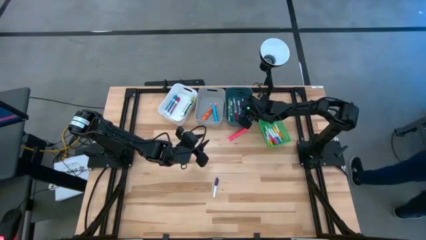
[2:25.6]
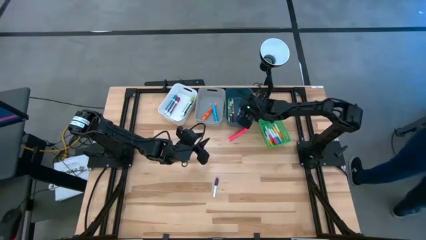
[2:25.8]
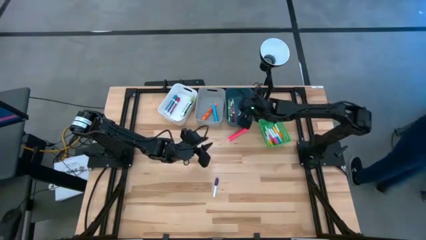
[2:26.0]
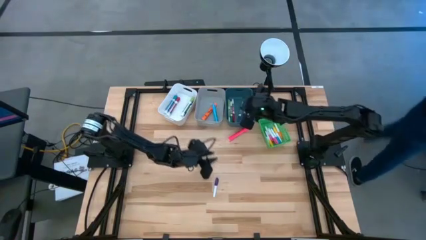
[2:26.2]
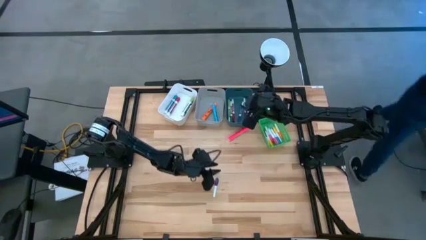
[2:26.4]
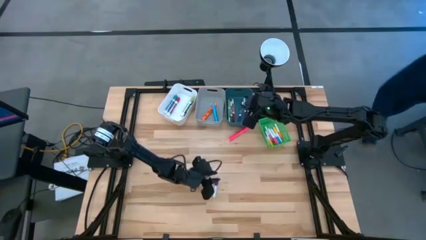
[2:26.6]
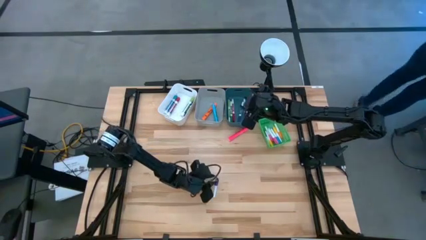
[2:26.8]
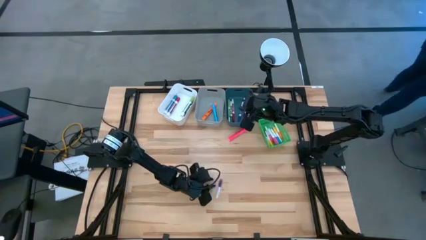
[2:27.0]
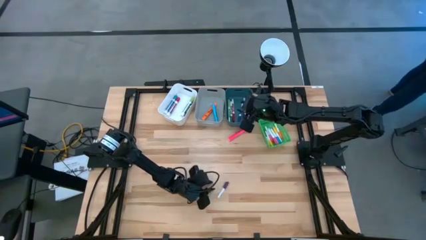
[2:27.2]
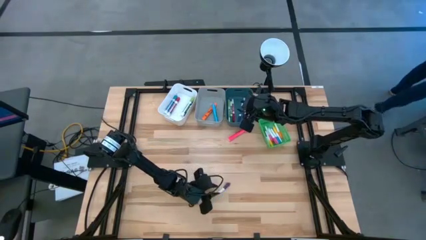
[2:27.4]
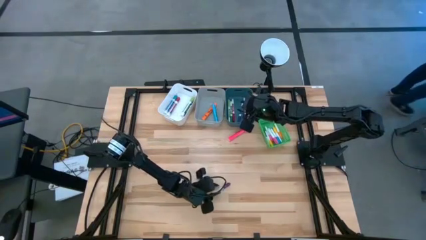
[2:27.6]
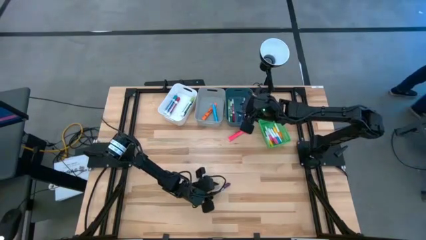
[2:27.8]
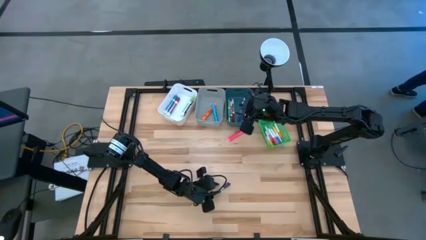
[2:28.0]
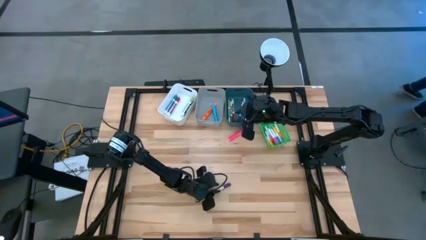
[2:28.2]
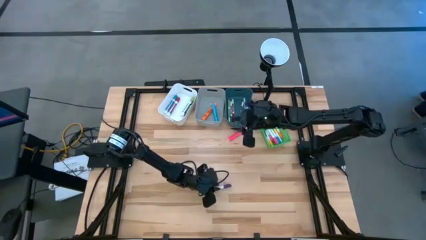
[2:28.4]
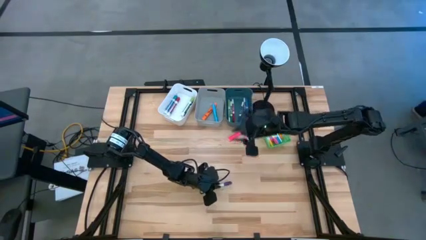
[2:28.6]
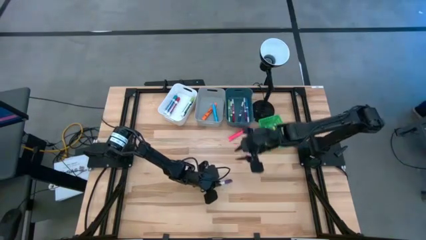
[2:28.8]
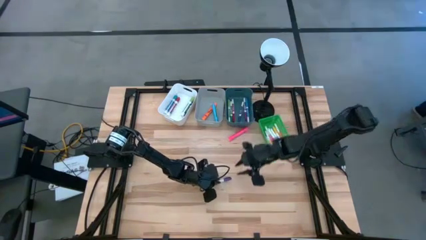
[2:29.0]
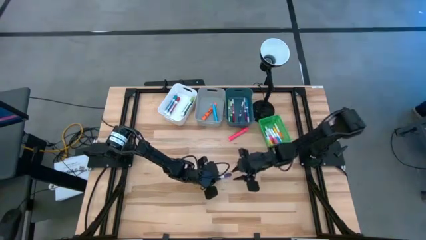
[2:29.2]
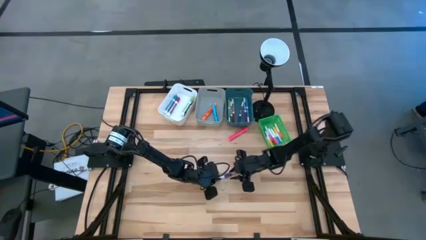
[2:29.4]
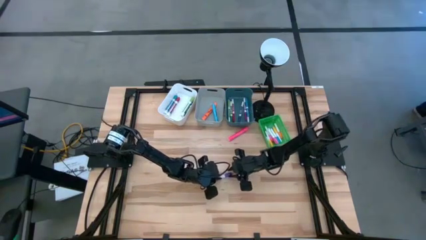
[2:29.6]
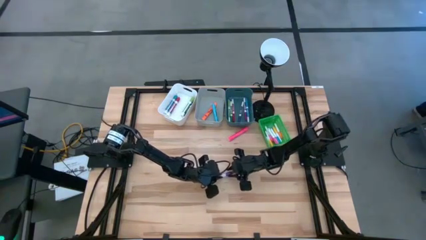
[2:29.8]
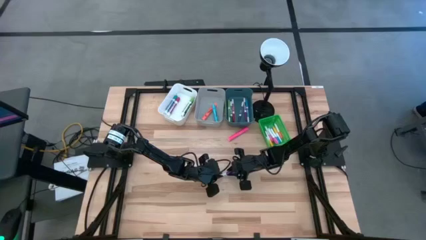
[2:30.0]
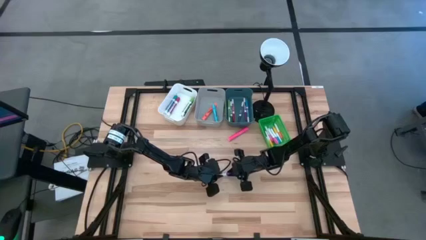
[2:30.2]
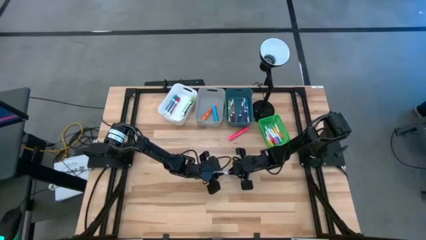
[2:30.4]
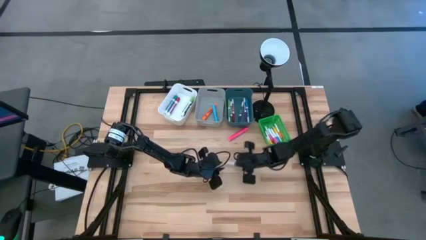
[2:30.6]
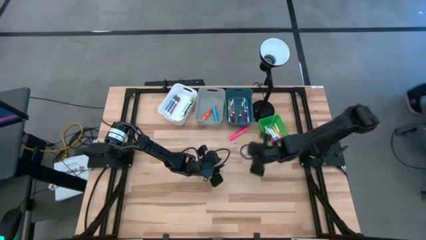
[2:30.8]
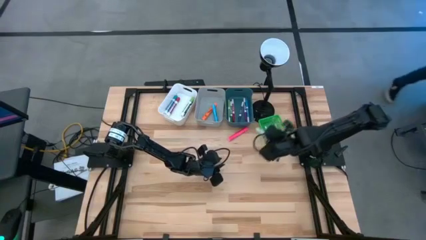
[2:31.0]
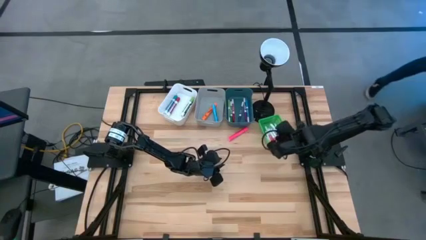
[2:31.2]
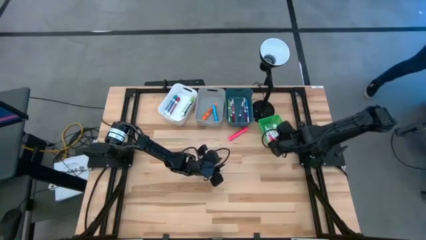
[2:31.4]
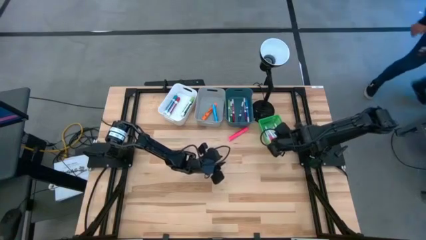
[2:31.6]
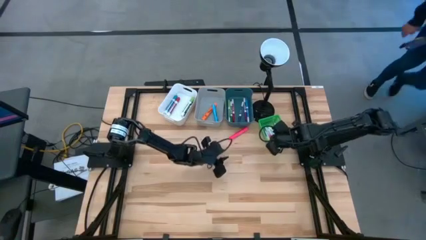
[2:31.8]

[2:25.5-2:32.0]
Task: Pick & Place Markers
Put the dark blue highlighter pen into the green bin

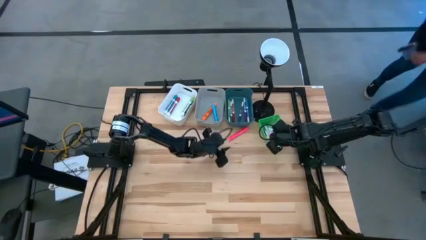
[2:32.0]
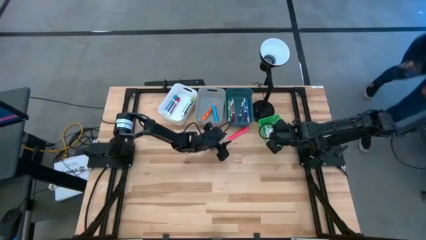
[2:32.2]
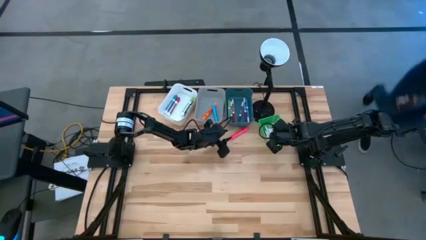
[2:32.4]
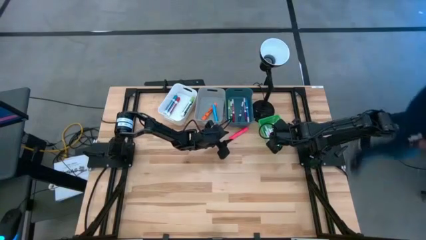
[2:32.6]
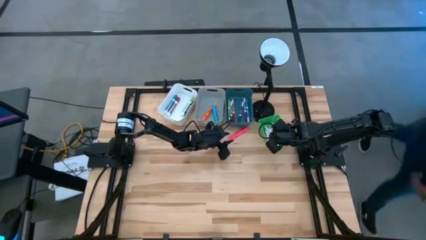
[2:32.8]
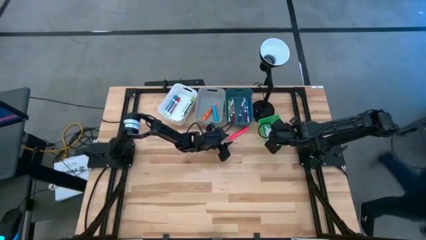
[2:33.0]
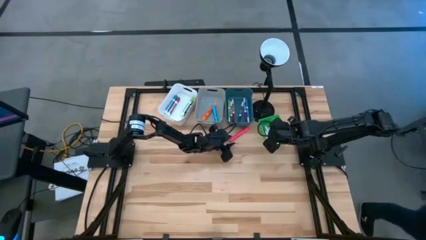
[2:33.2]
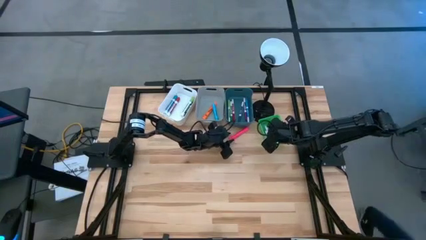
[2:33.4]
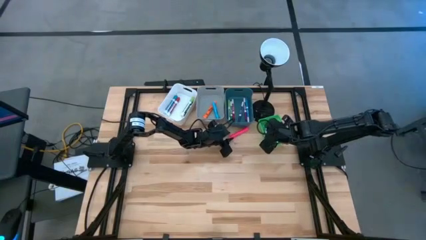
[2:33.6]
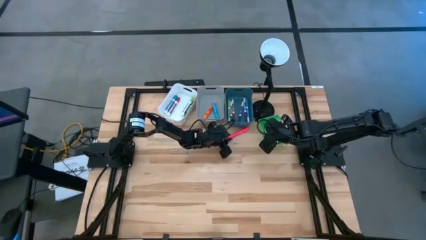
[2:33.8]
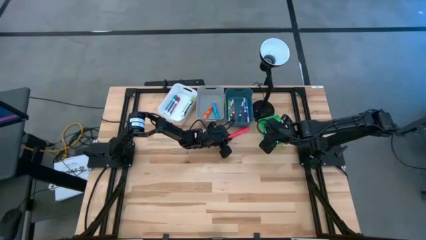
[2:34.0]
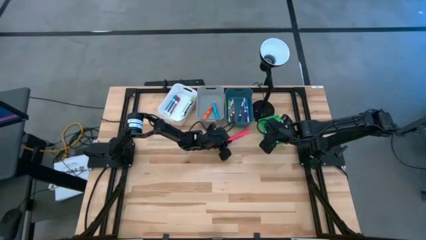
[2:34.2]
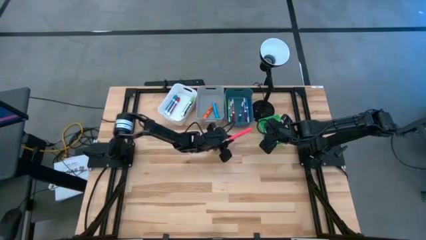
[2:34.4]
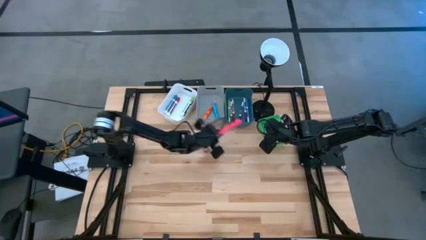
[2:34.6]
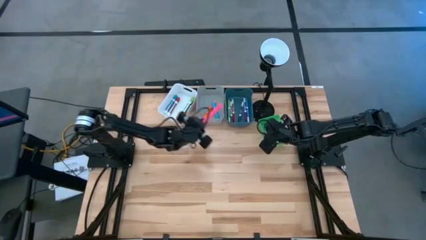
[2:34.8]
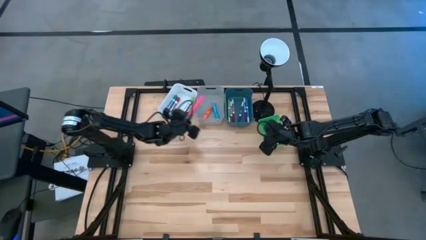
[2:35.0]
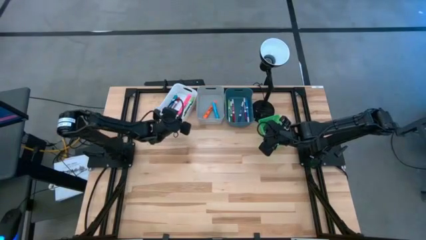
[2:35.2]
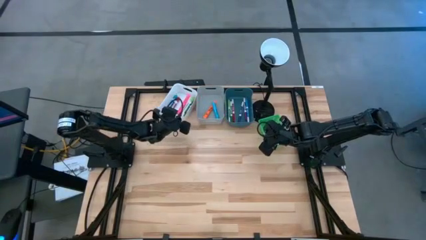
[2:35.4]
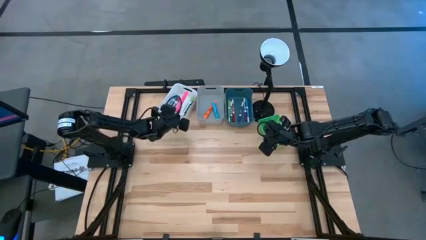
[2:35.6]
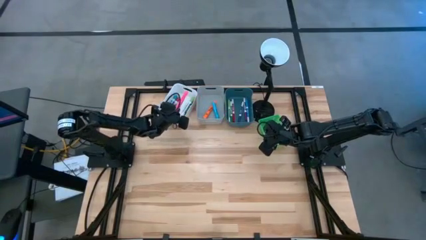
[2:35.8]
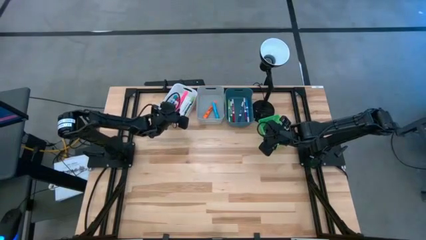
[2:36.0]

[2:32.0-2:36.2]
Put the pink marker pen into the gray bin

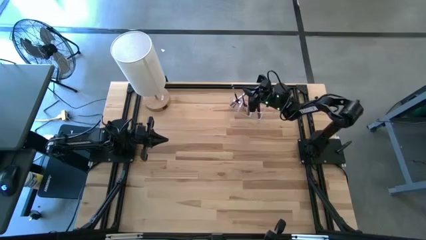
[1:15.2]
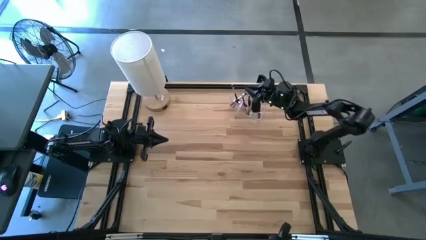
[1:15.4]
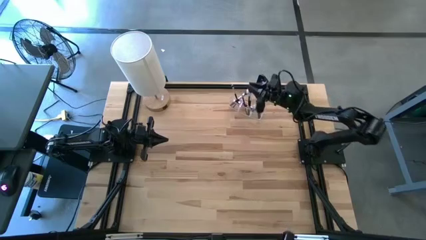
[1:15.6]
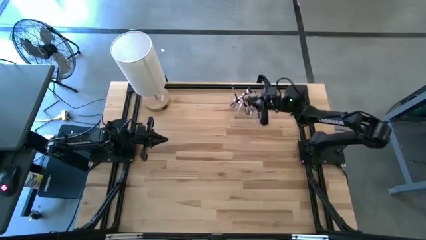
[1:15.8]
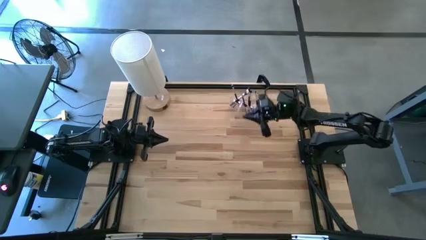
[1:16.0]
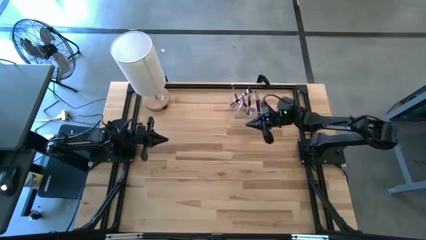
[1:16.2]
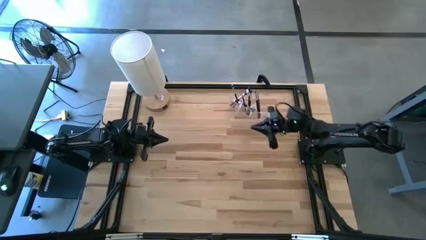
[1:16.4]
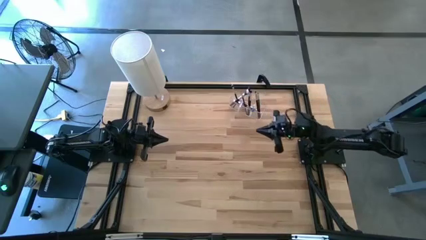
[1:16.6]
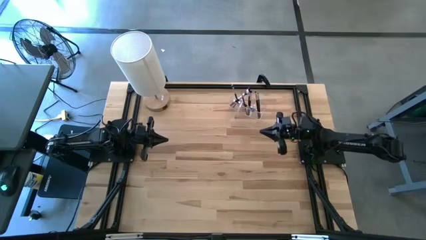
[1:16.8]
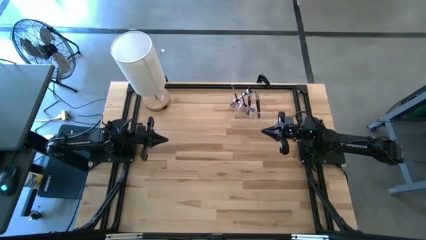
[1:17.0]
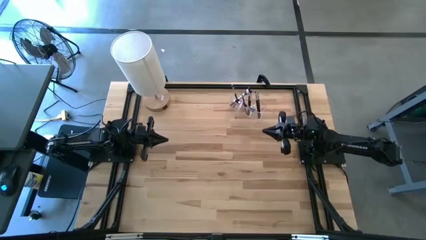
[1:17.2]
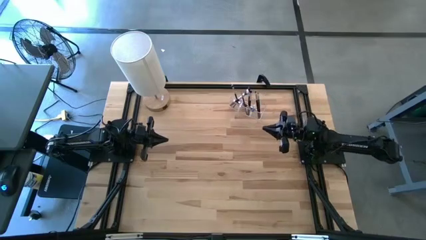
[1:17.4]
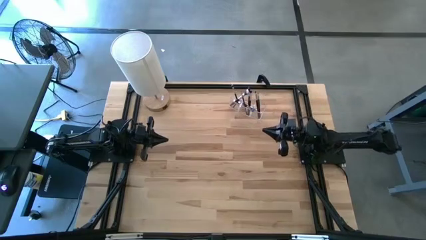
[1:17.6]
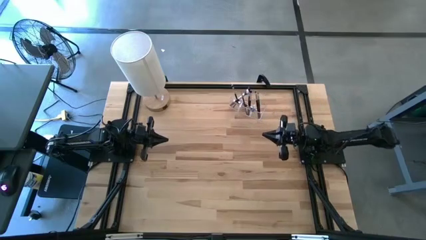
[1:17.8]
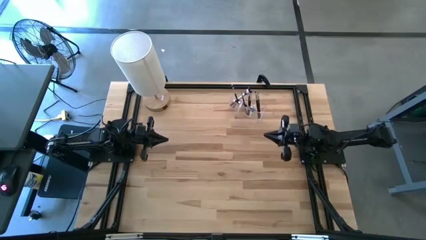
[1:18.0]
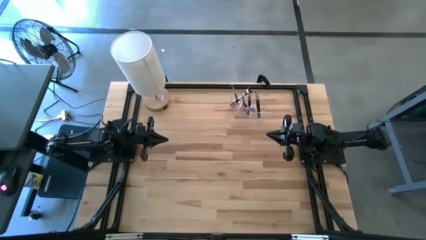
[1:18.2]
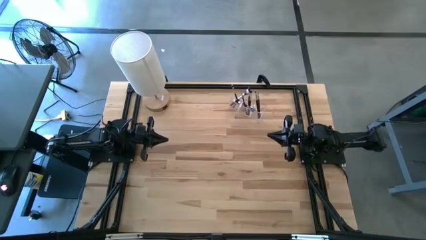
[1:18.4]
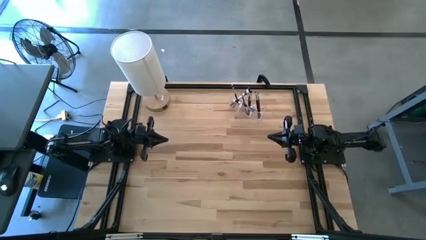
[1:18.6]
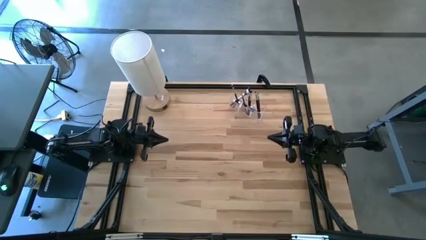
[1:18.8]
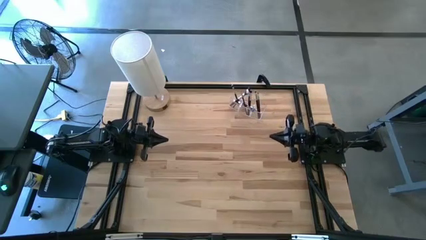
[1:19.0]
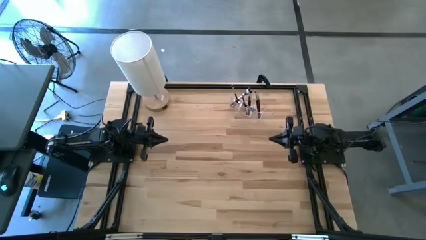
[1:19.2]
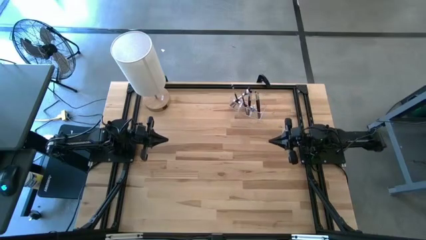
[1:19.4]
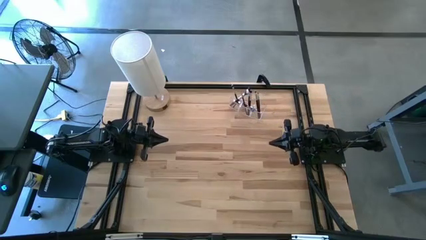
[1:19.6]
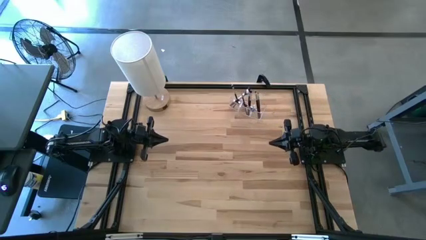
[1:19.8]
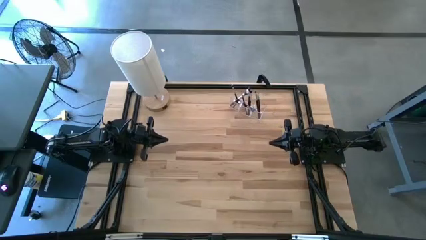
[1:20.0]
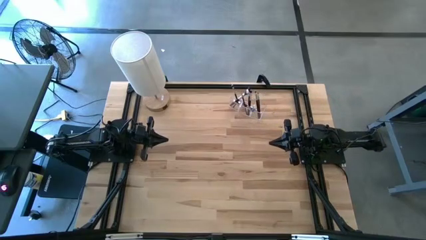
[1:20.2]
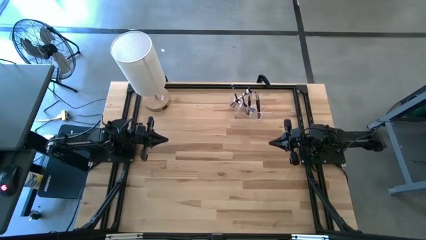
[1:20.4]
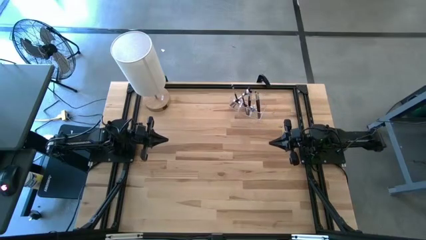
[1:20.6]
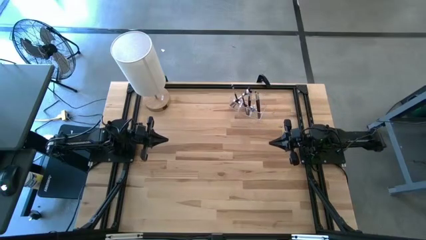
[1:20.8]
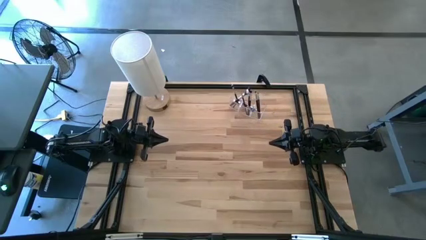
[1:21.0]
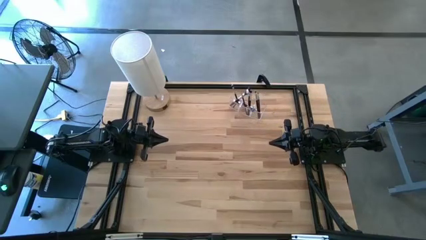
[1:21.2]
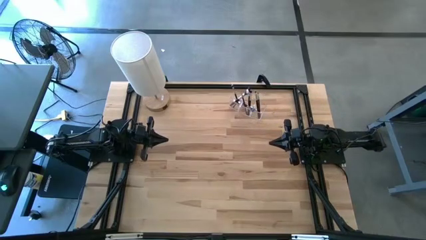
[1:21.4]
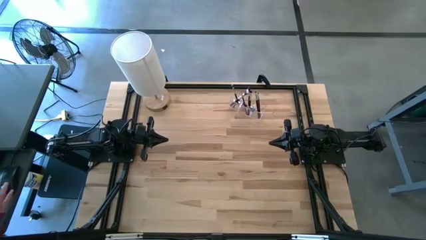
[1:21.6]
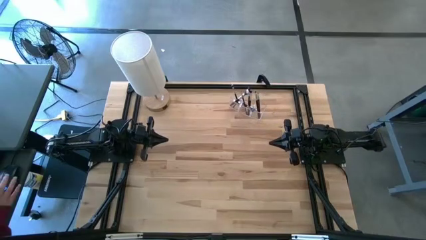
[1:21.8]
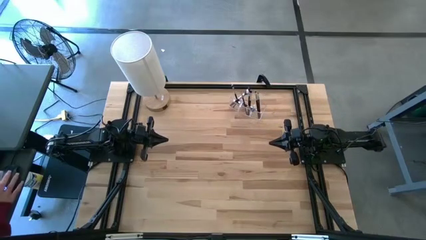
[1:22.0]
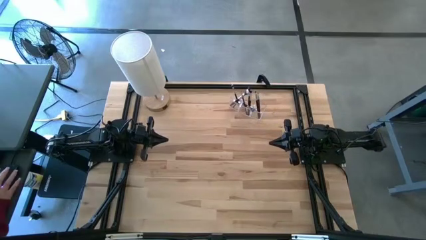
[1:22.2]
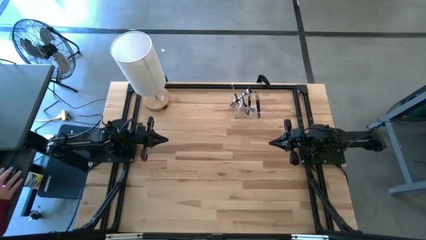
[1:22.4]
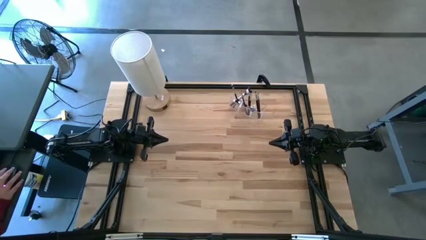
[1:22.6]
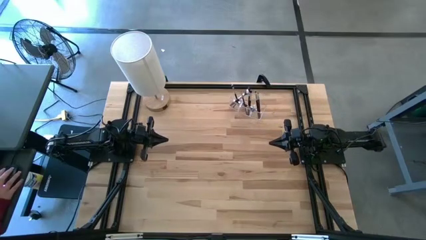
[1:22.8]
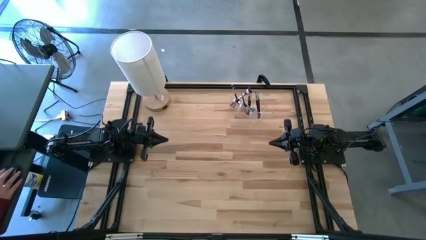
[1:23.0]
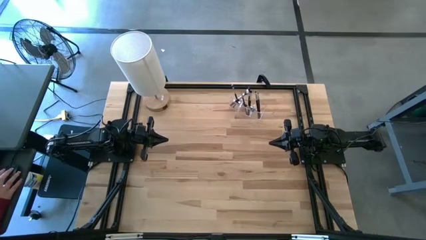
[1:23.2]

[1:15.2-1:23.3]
Task: Pick & Place Makeup Brushes
Return to Home Position
